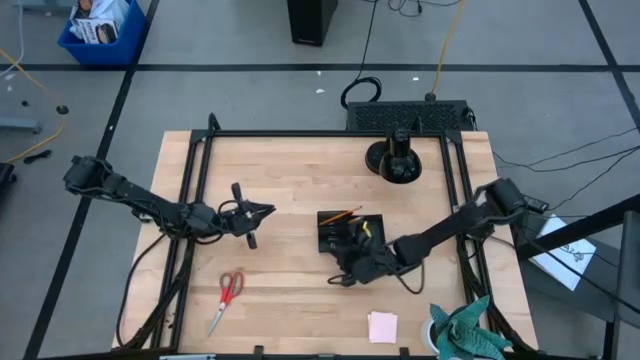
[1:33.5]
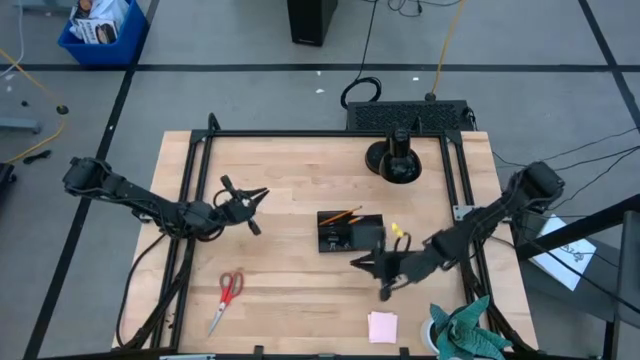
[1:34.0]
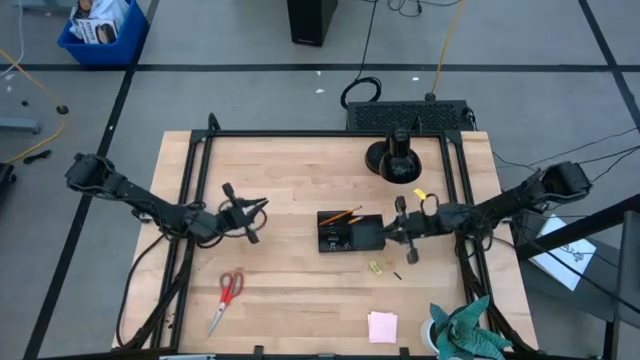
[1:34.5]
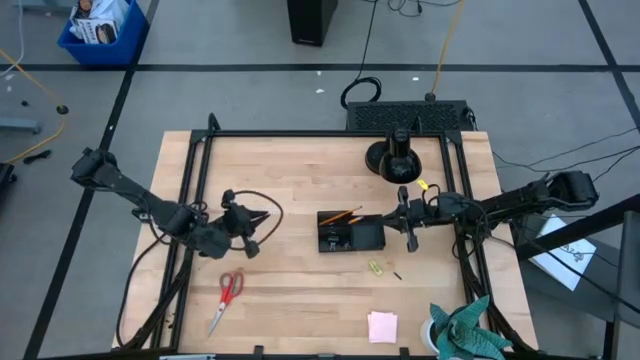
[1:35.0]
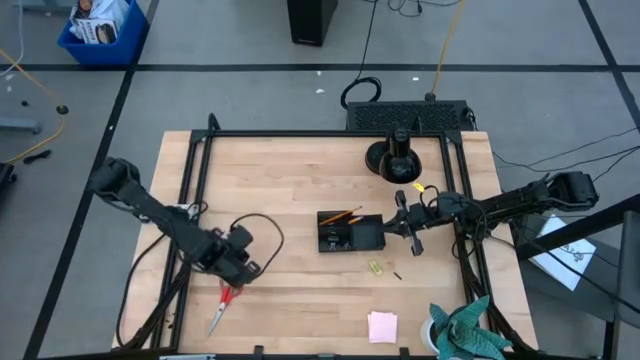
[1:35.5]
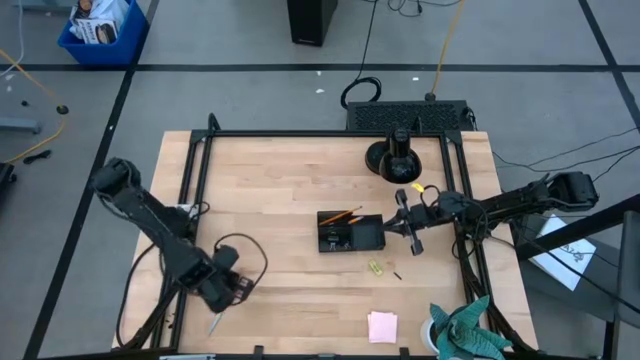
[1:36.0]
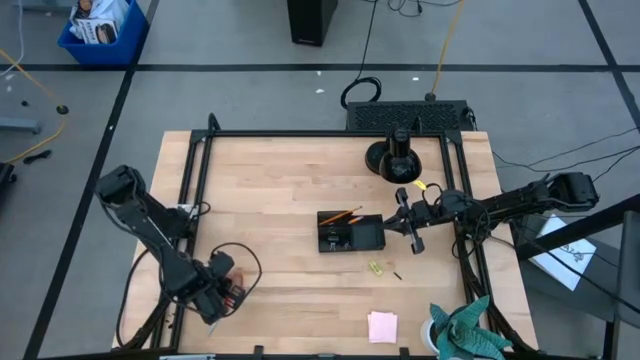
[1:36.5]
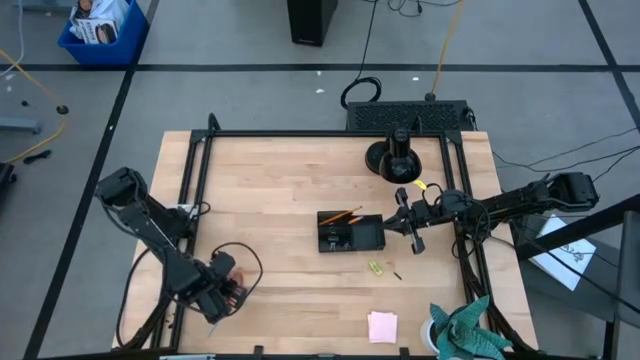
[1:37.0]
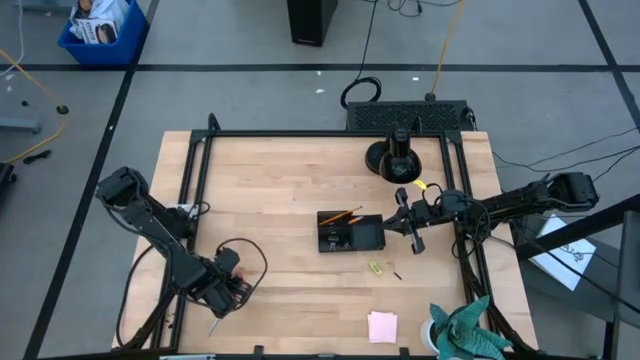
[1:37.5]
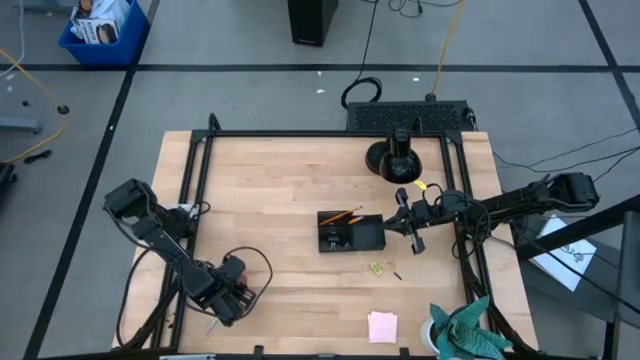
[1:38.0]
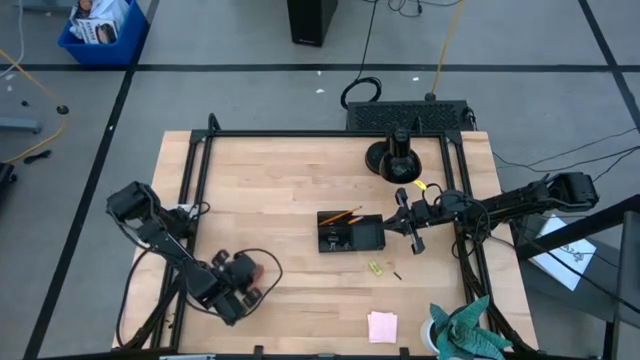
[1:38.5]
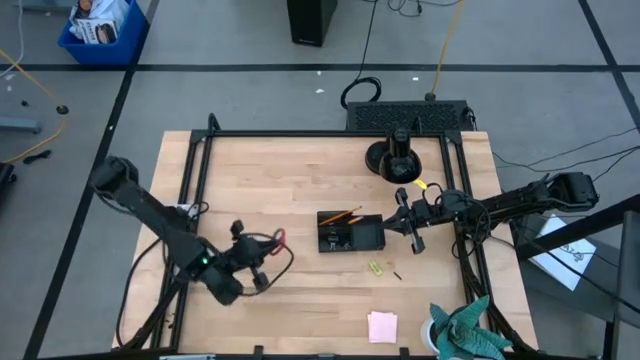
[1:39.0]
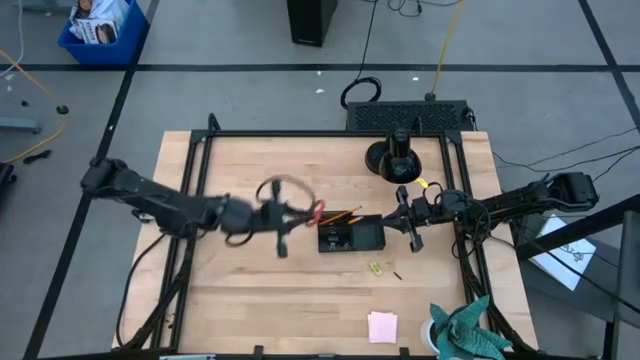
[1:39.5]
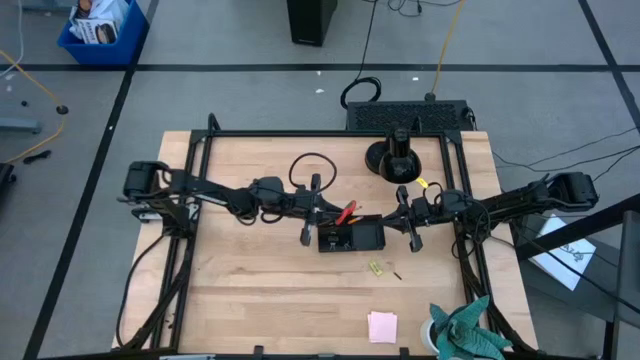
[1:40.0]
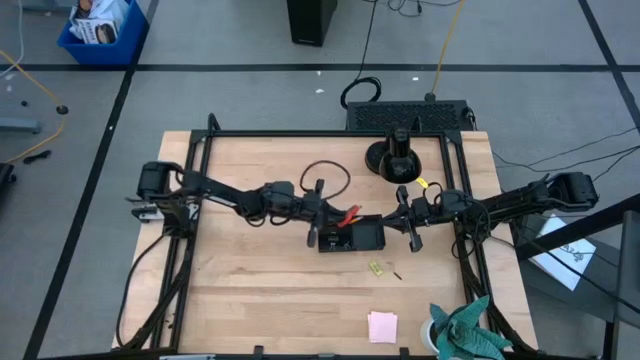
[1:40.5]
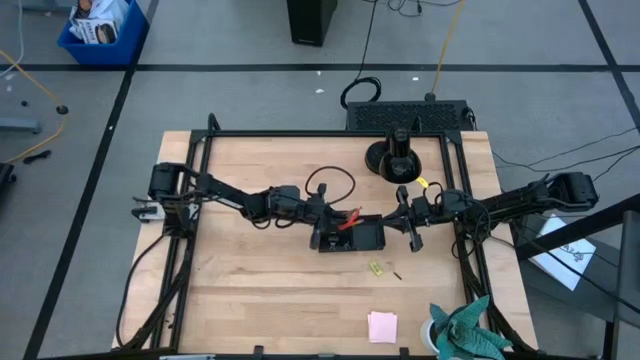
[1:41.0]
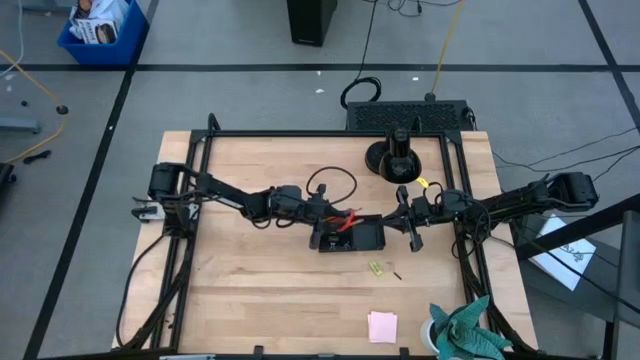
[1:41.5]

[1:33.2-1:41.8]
Task: Pick and place office supplies into organizer
Put the red scissors into the black desk organizer

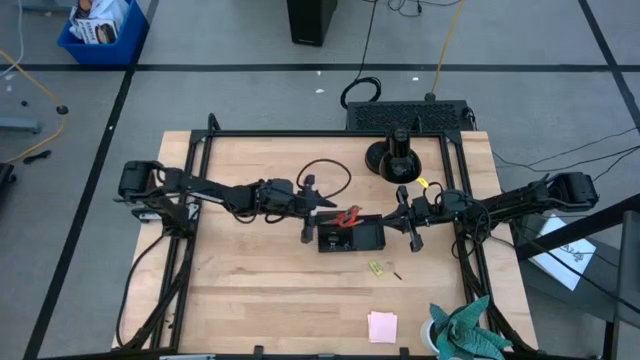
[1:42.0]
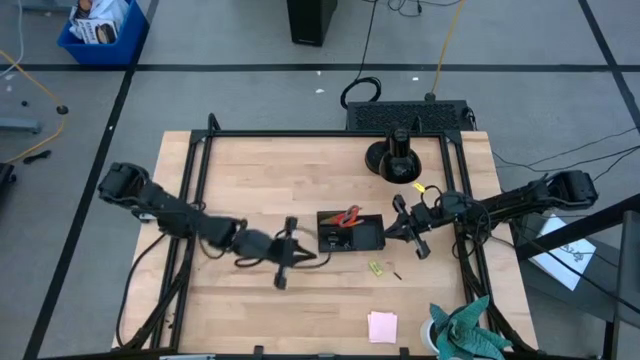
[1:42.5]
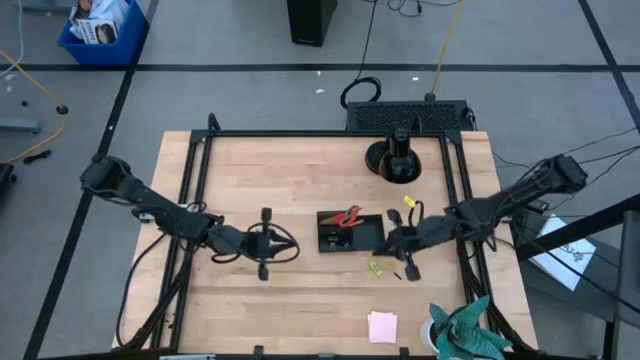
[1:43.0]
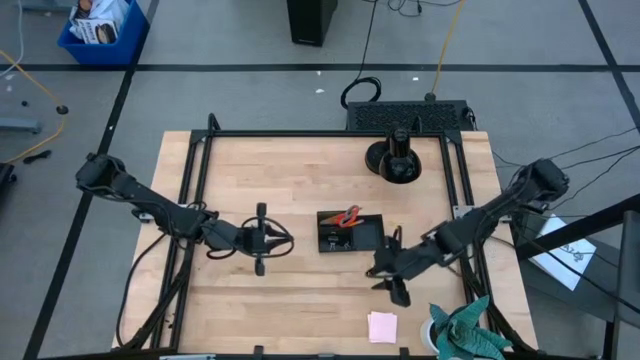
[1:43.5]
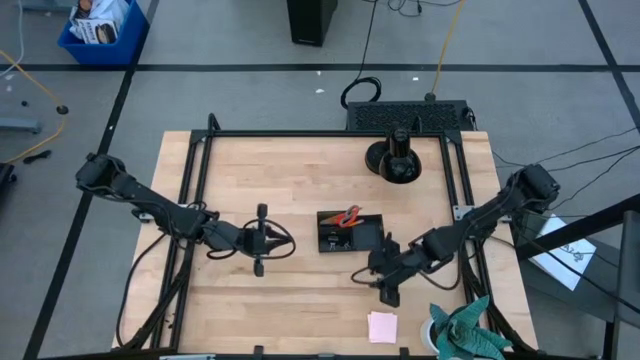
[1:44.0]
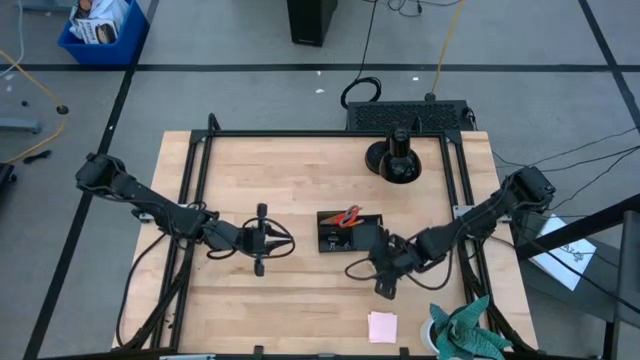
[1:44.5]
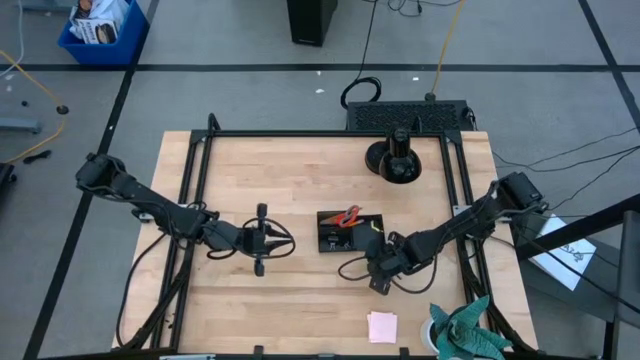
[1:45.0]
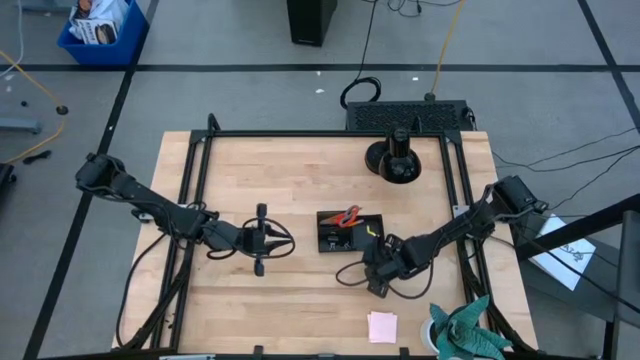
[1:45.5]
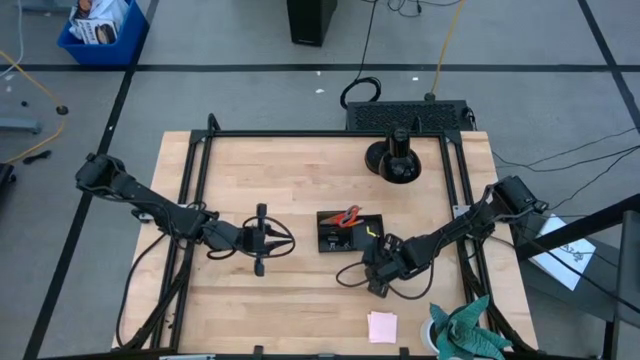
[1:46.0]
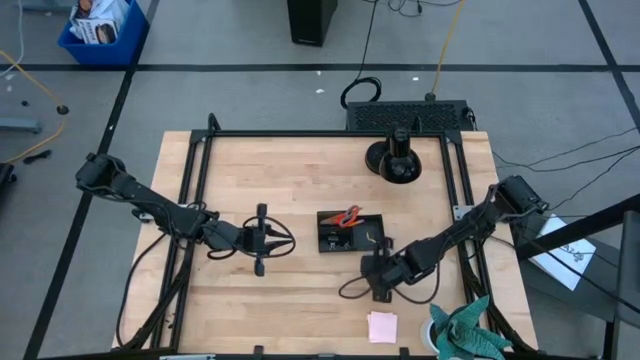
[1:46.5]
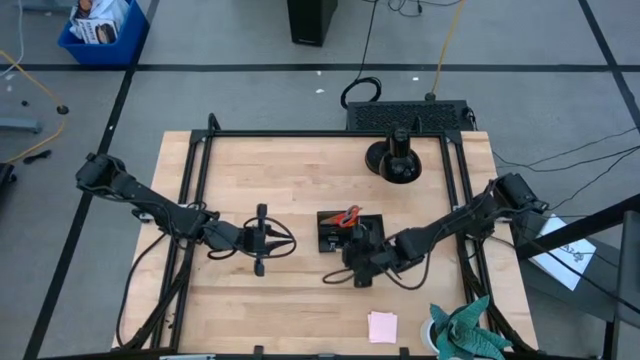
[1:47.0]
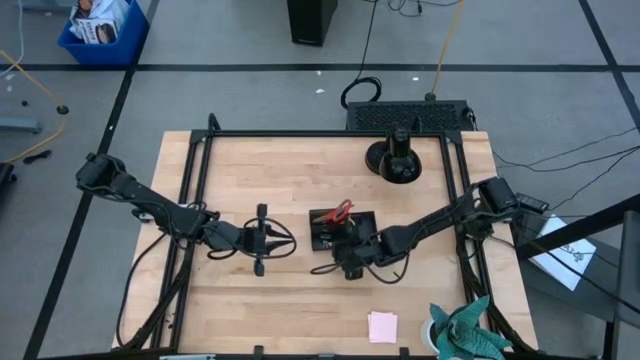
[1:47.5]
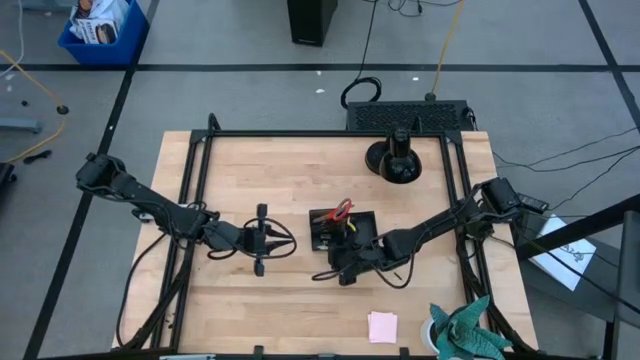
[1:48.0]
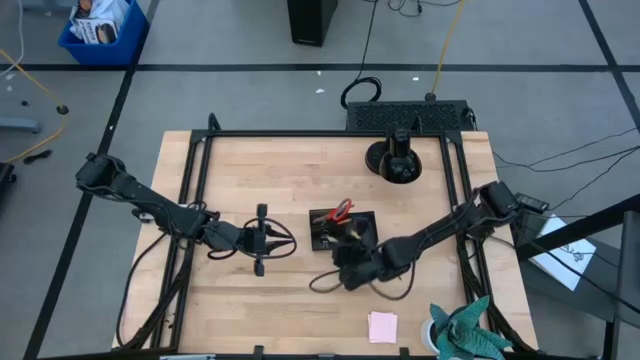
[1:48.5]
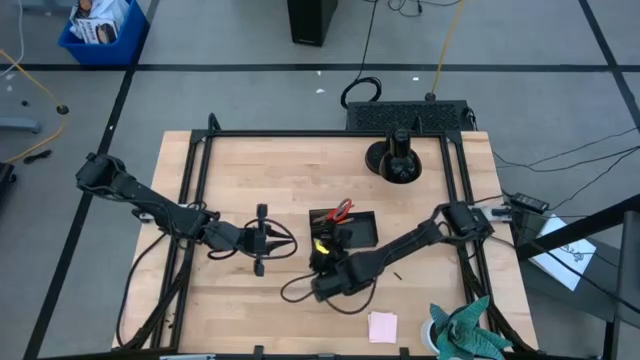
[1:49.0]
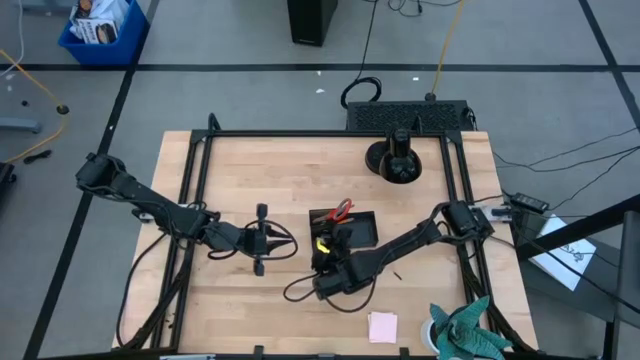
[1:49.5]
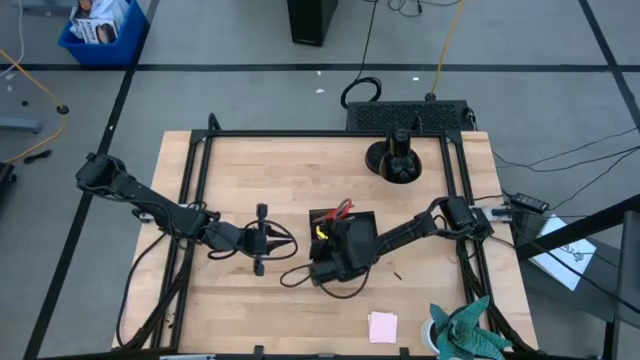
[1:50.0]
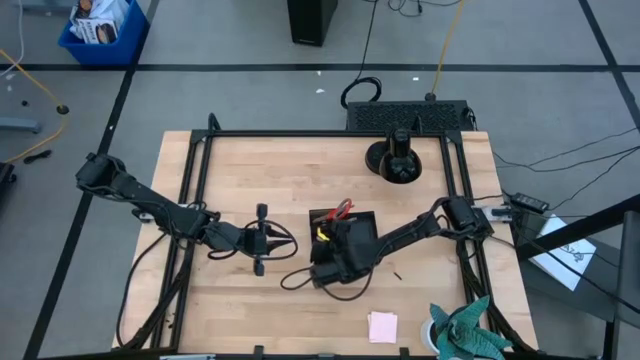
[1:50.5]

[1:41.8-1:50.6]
Put the yellow eraser into the black desk organizer

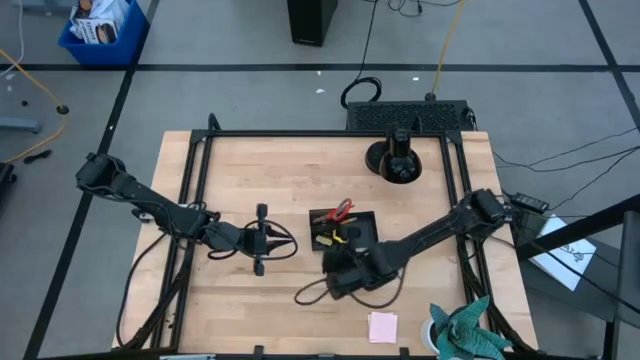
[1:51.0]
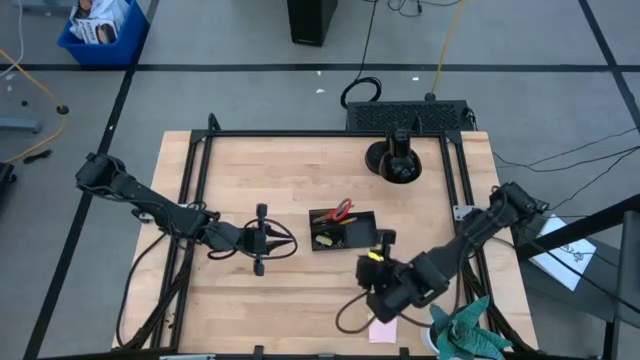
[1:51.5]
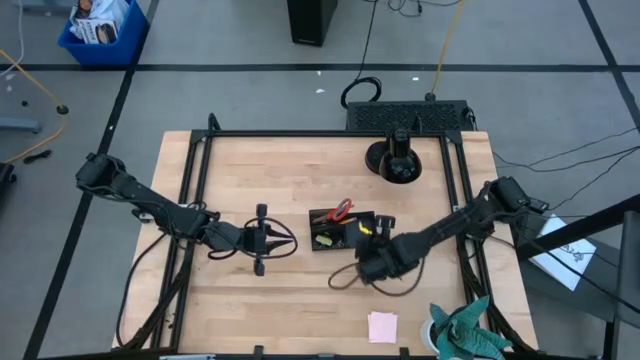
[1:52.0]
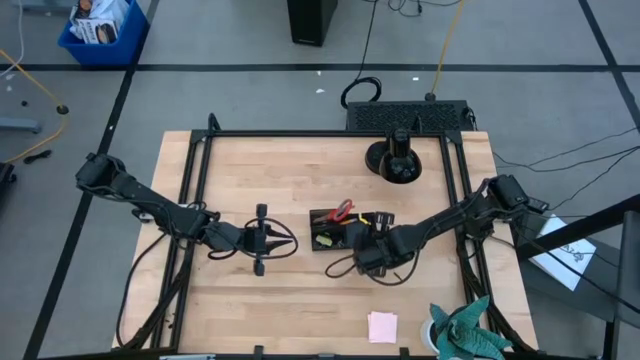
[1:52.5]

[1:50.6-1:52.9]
Adjust the black desk organizer

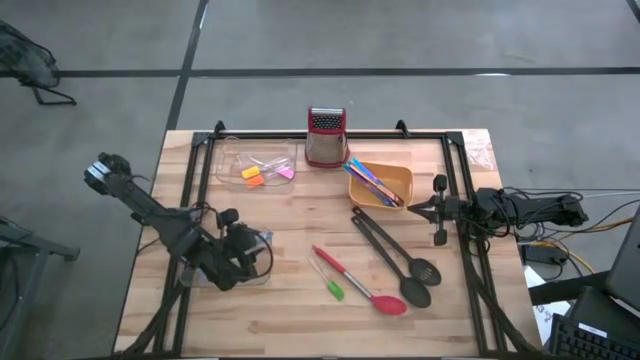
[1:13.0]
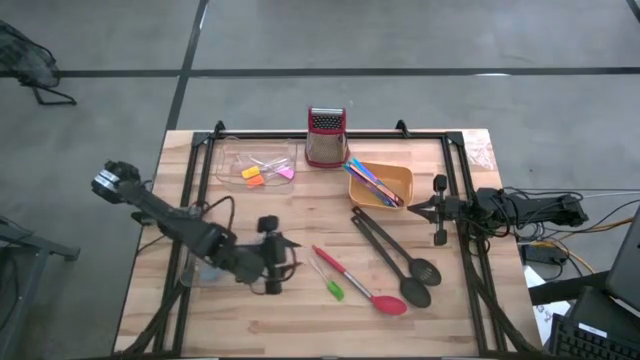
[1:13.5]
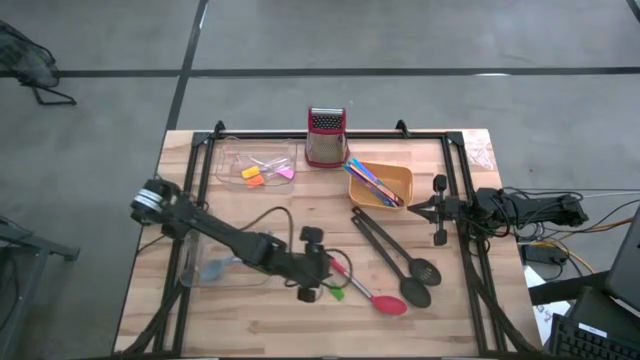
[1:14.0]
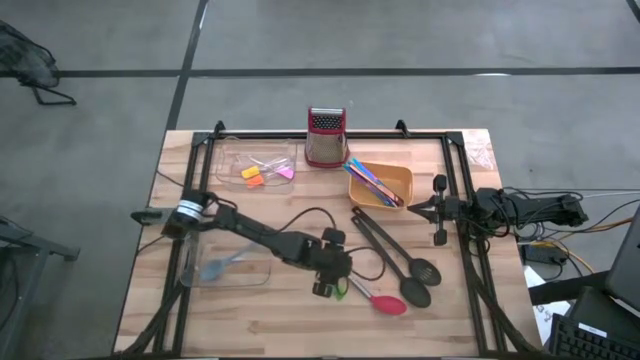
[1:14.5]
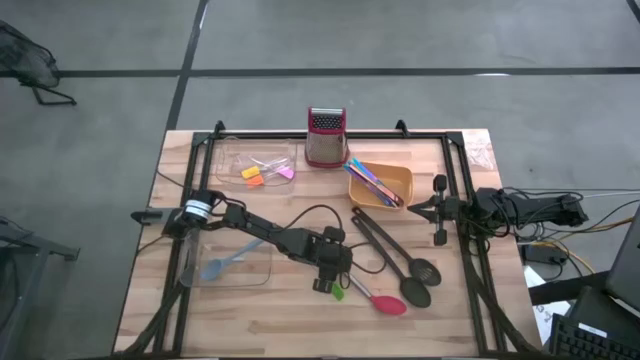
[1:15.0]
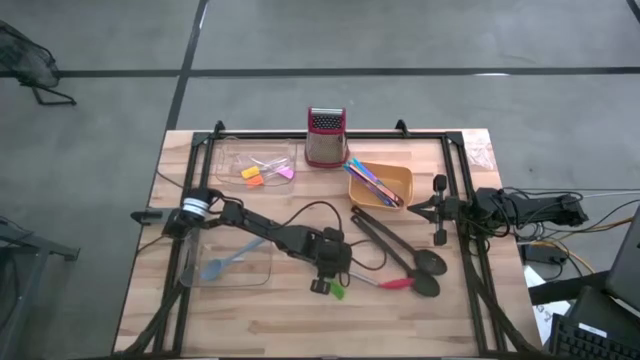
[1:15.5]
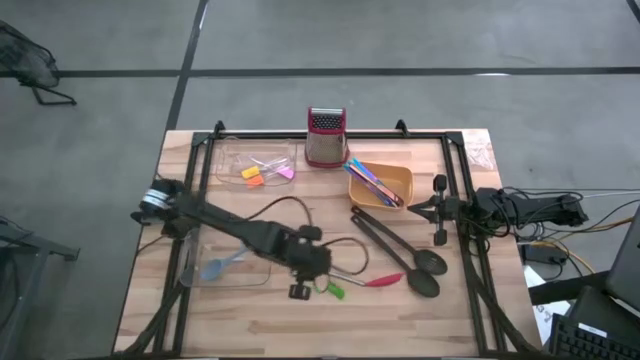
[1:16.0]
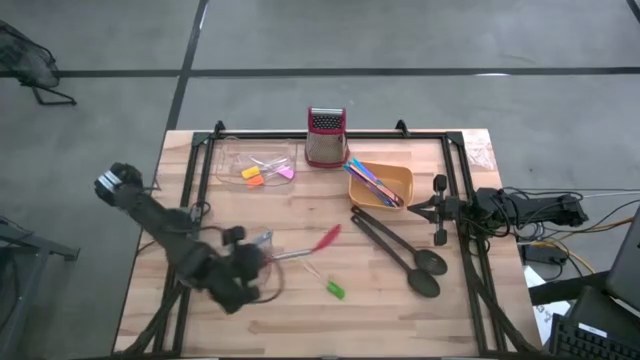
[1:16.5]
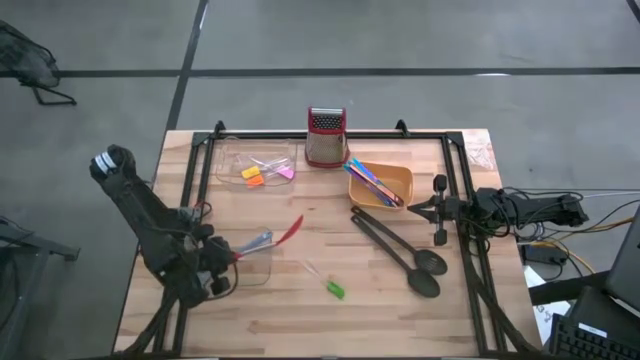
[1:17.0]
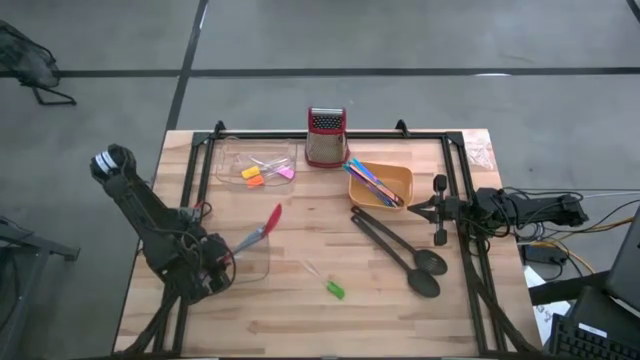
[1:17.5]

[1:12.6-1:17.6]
Task: Pick & Place Kitchen Items
Put the orange spoon into the bottom transparent bin
